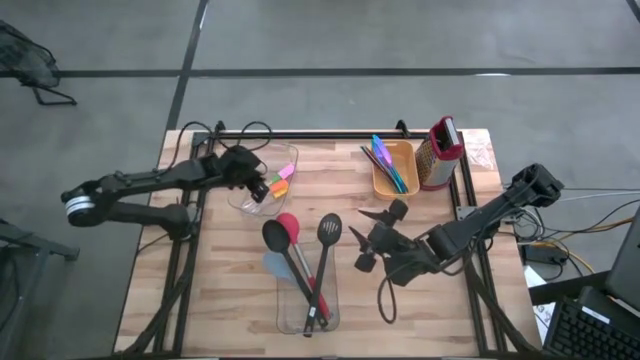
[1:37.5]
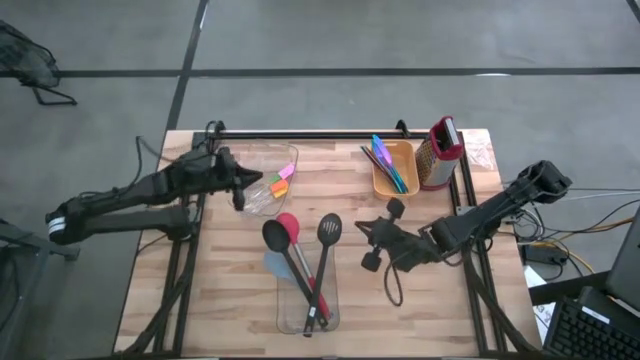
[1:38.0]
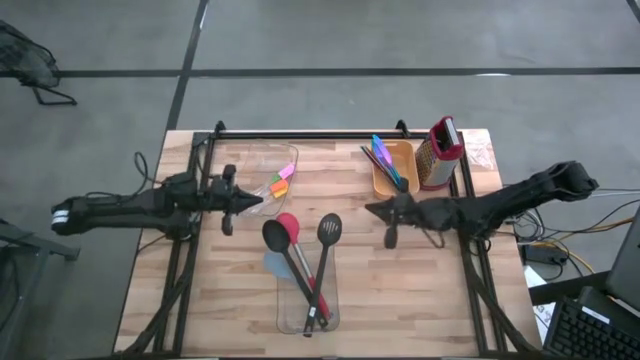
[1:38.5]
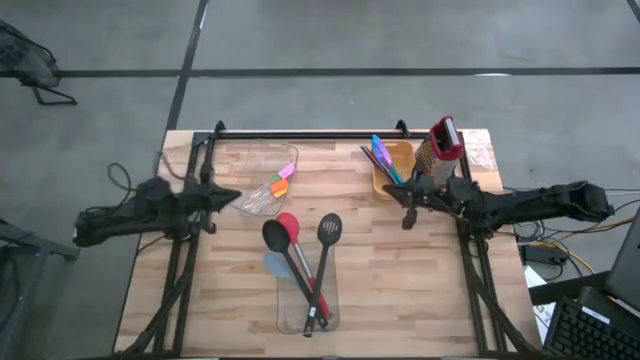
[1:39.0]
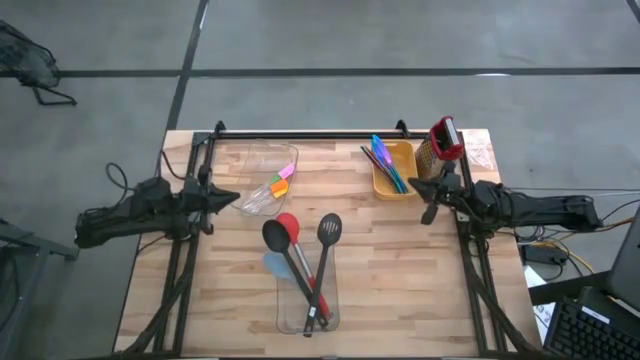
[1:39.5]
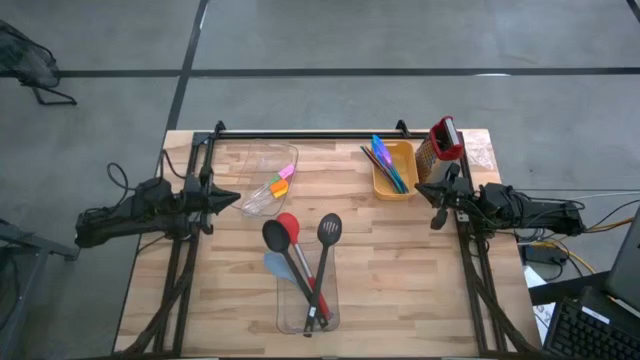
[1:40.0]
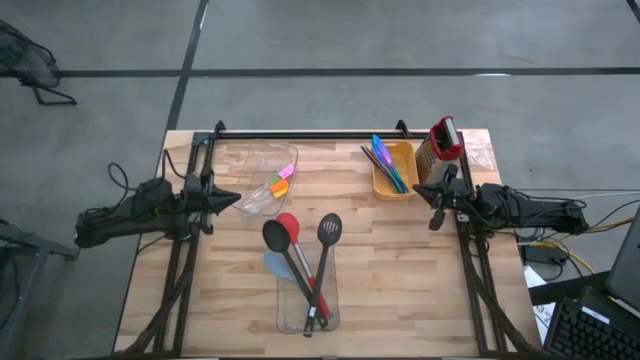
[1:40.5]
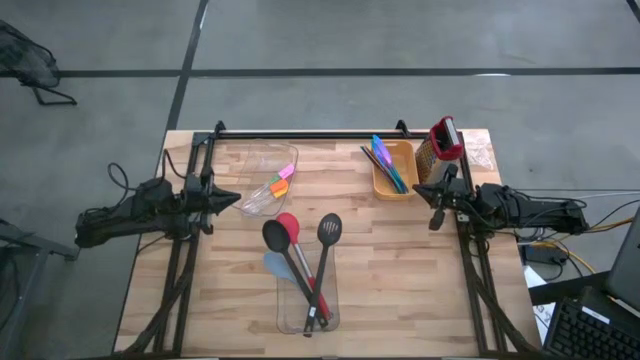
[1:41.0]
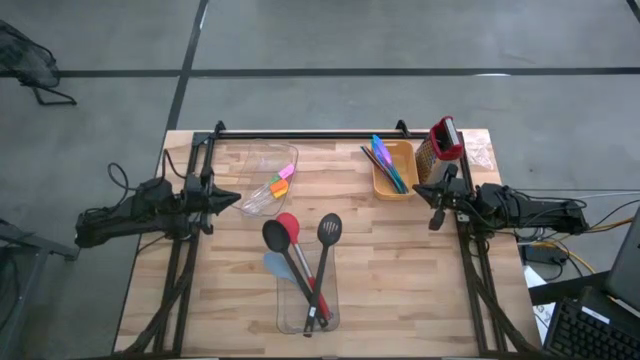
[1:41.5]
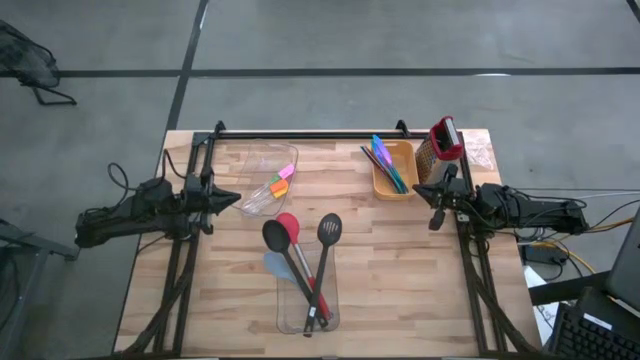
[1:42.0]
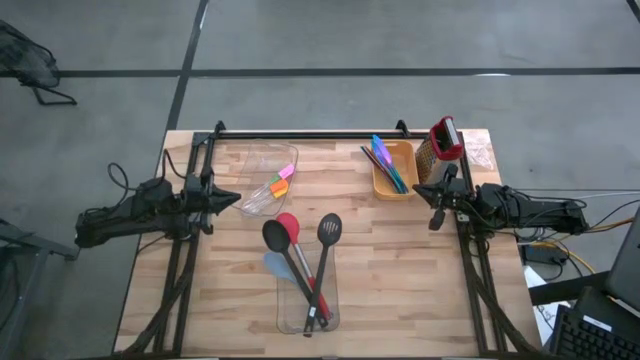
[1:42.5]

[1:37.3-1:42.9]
Task: Pick & Place Kitchen Items
Return to Home Position

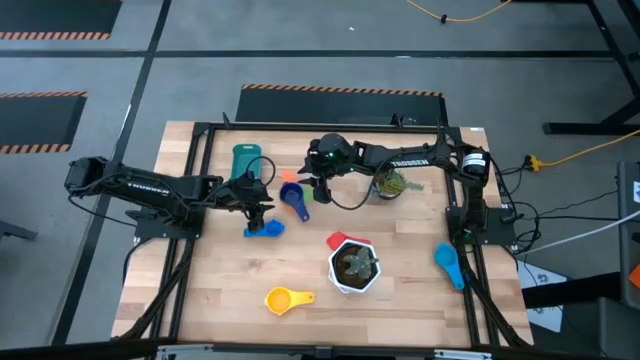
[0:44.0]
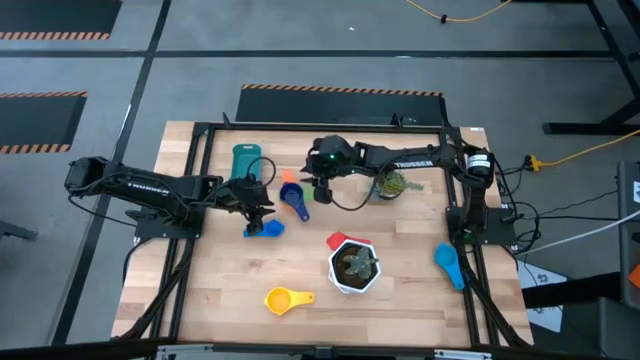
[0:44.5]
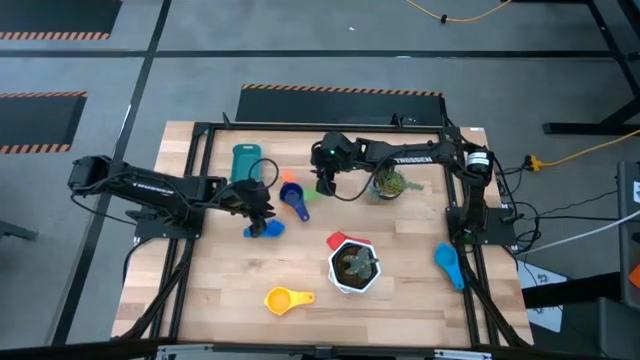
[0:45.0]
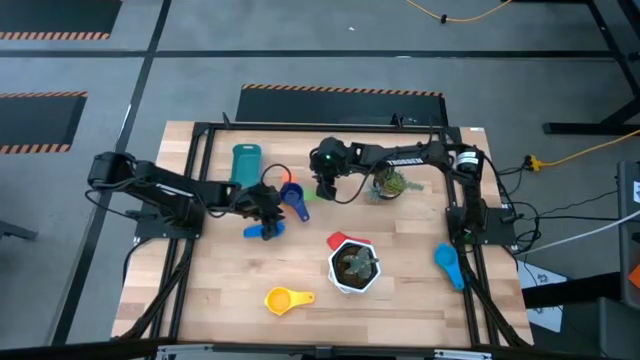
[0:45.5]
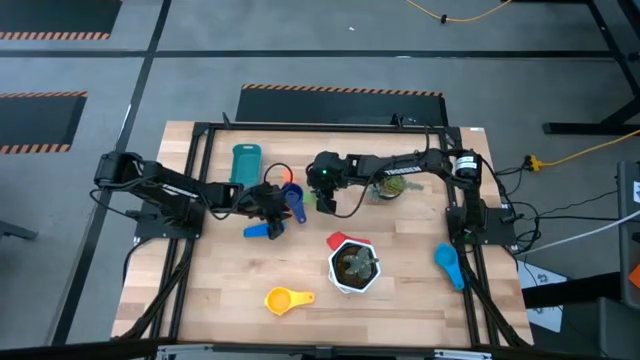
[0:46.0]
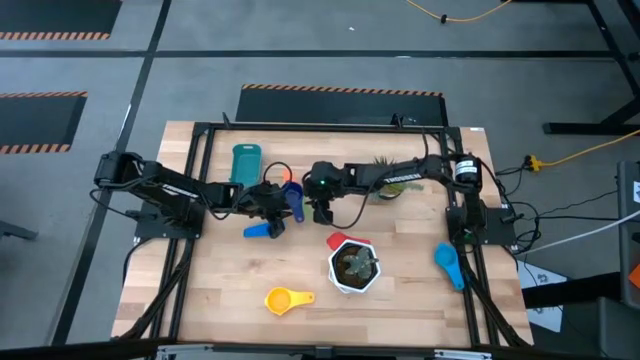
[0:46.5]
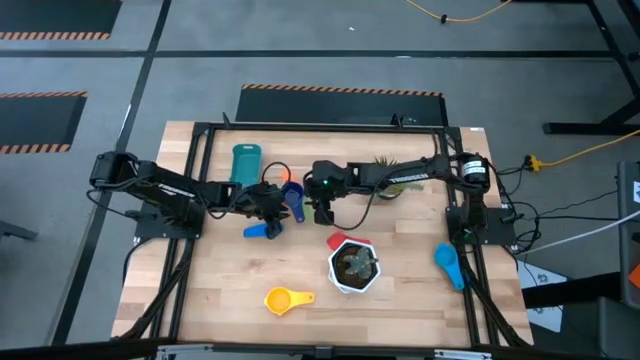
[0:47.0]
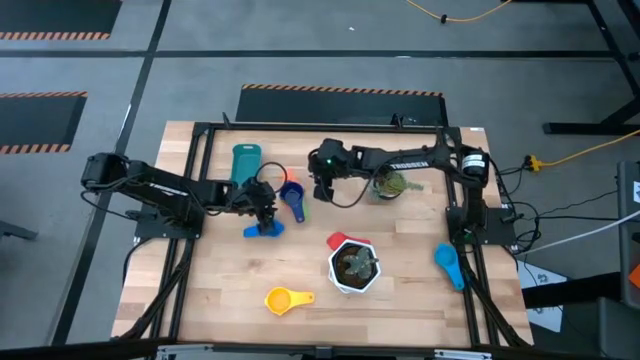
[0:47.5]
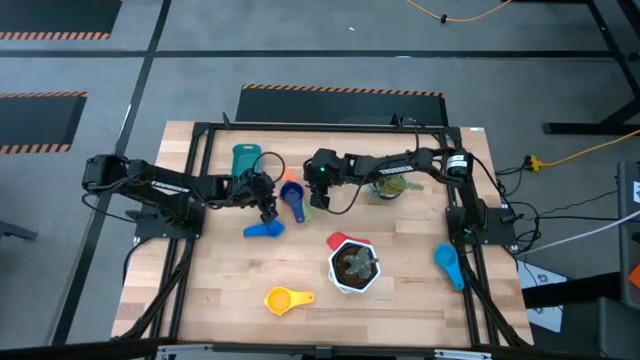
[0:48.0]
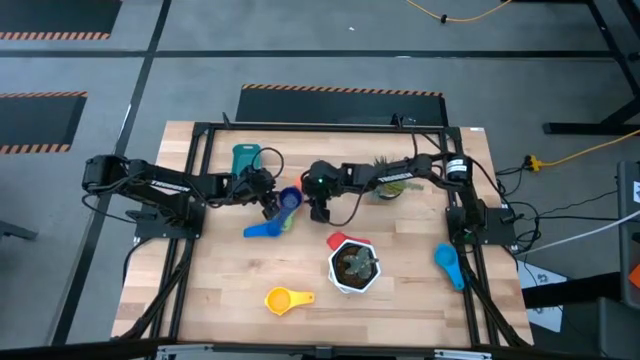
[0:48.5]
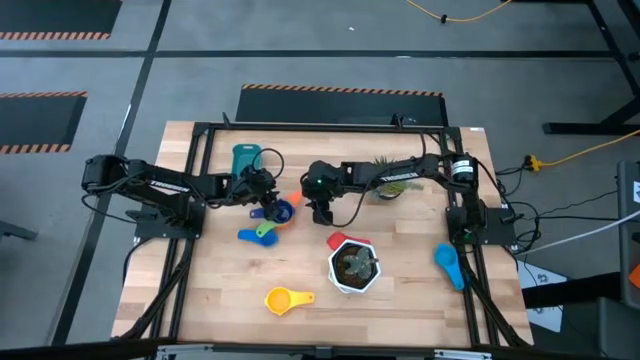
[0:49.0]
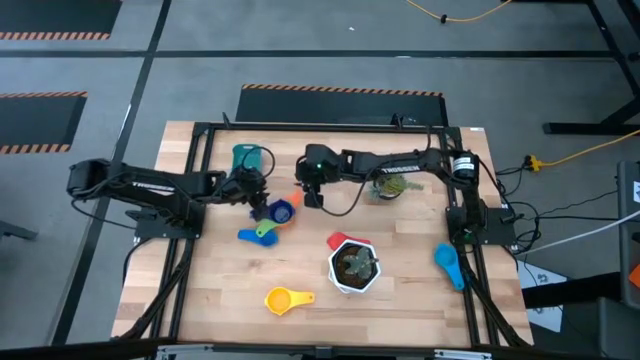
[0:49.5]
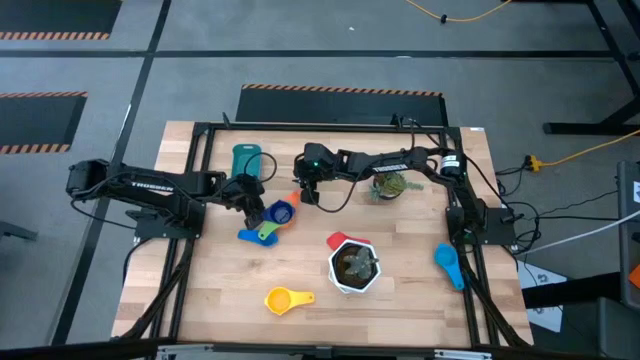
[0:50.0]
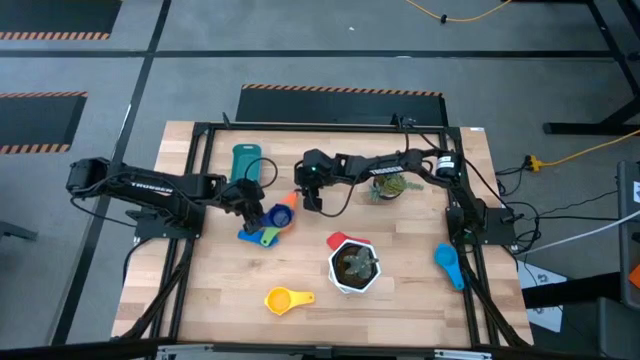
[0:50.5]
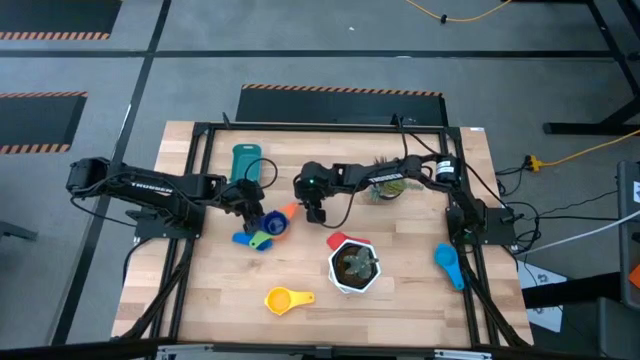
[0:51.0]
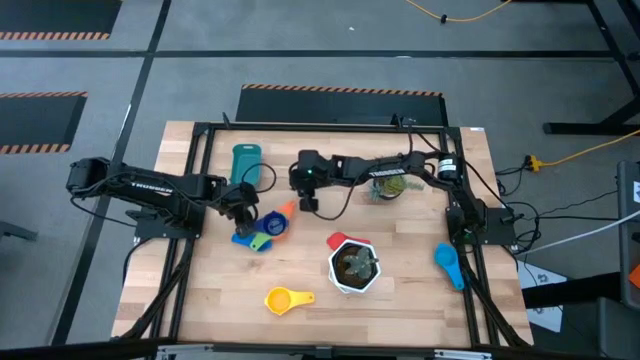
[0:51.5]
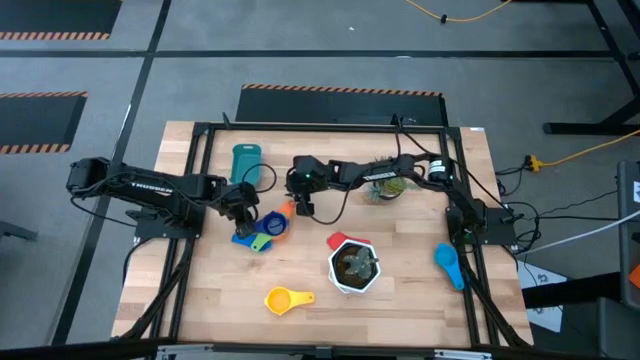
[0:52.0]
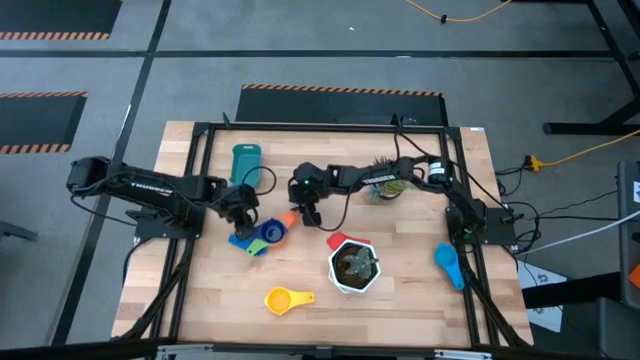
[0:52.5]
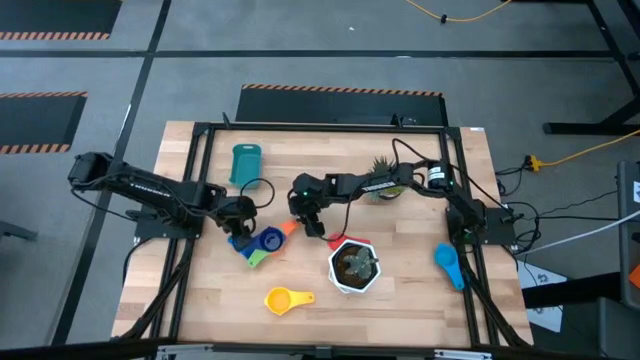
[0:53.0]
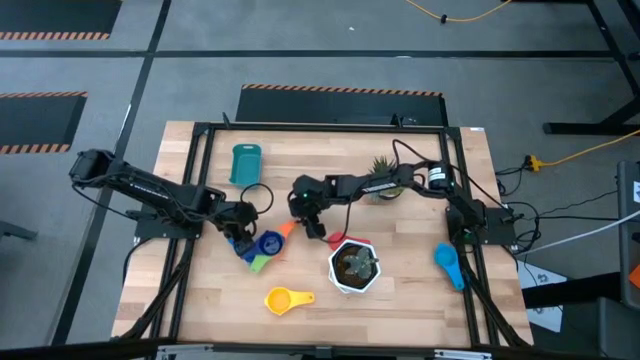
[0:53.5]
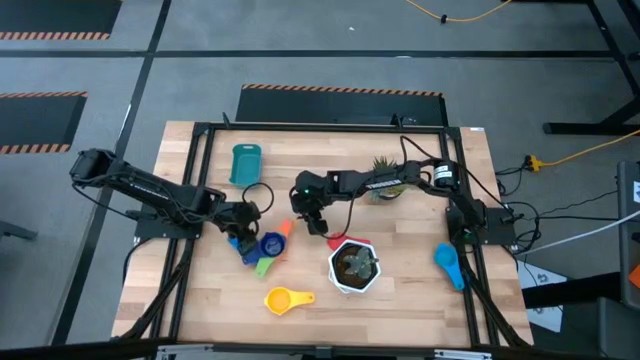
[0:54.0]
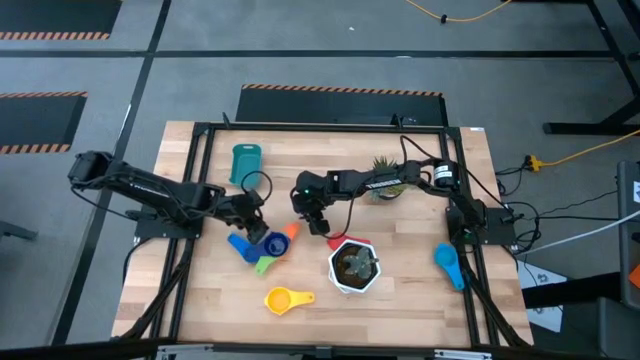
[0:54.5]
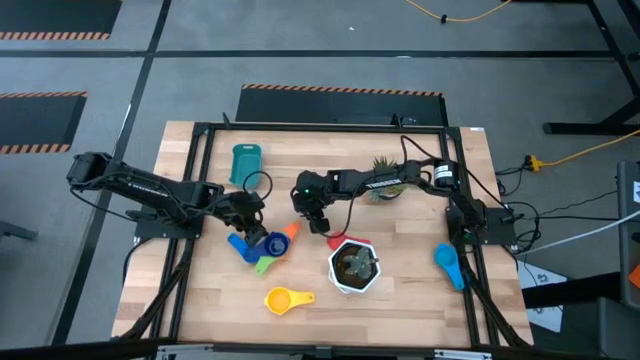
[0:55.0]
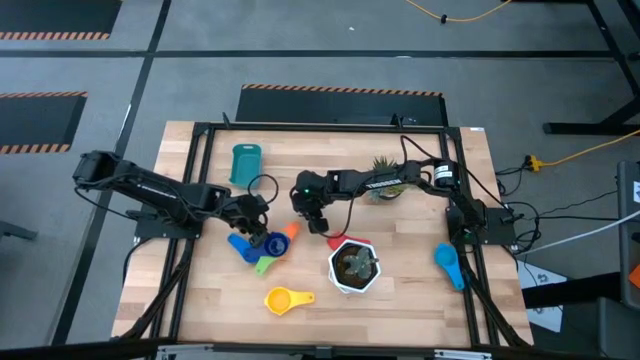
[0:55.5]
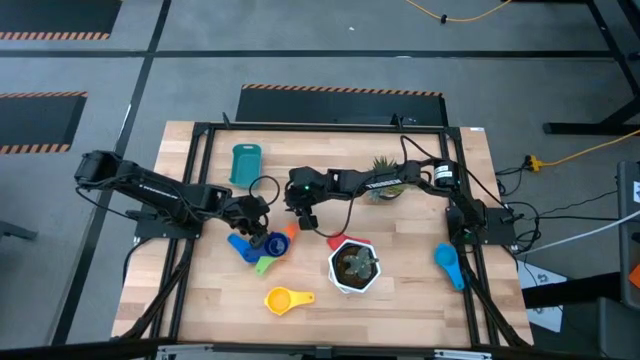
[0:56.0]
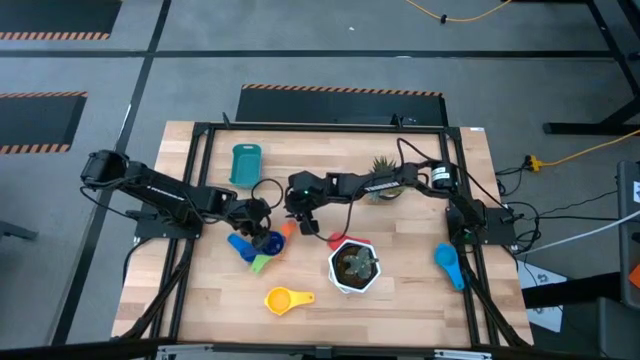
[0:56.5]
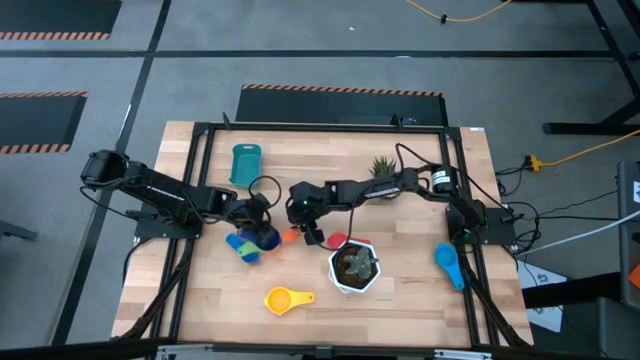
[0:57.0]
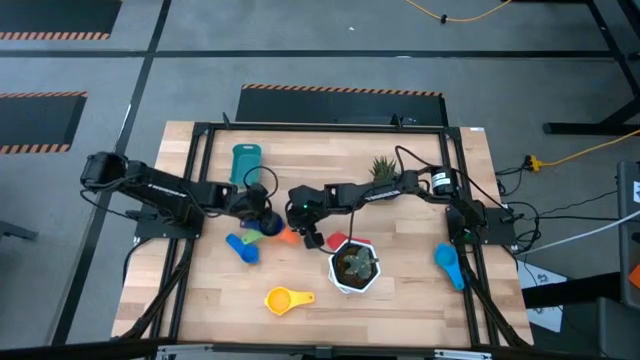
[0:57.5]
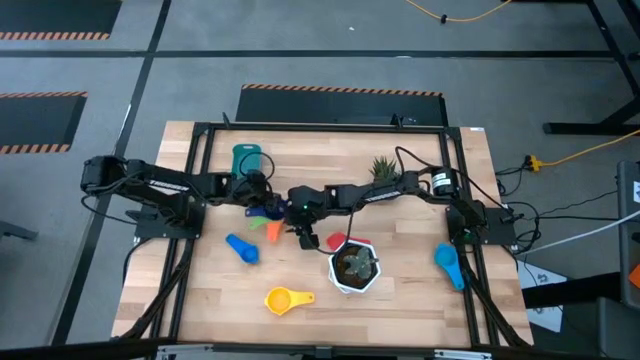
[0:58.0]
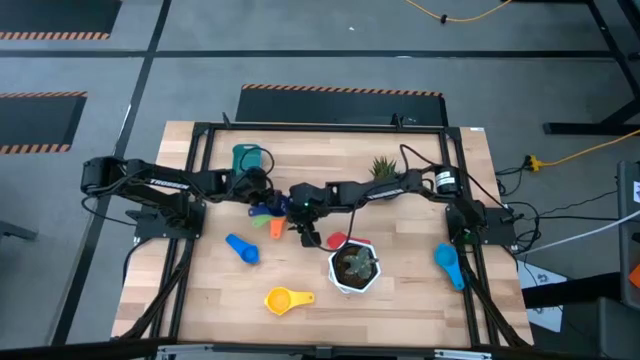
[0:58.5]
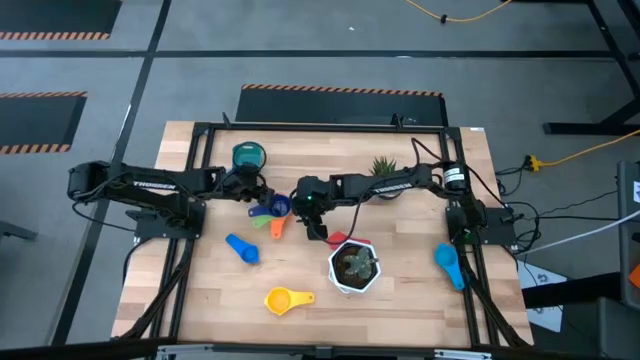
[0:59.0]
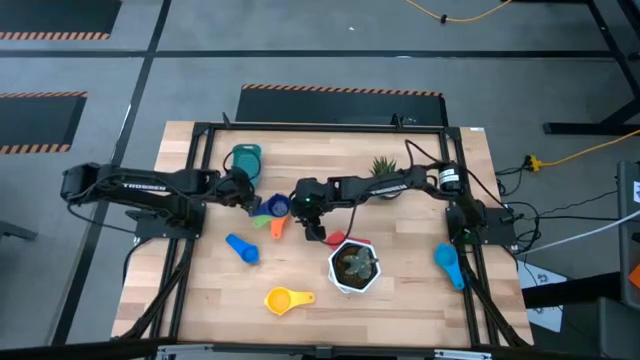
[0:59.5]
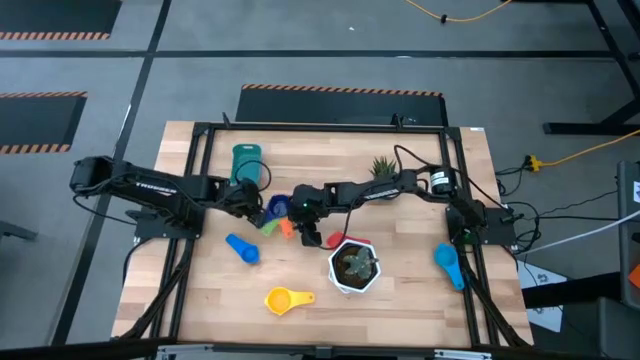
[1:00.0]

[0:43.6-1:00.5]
Task: Nest measuring cups in basket
Adjust the nested measuring cups to an aligned position
